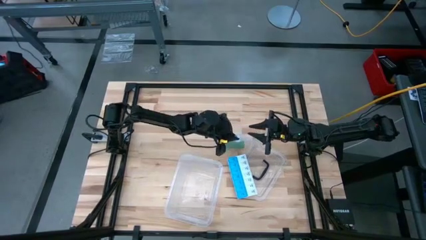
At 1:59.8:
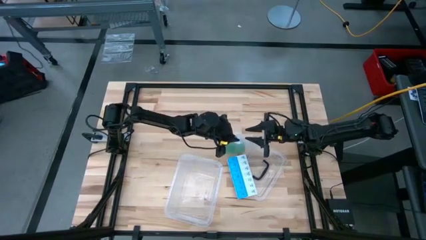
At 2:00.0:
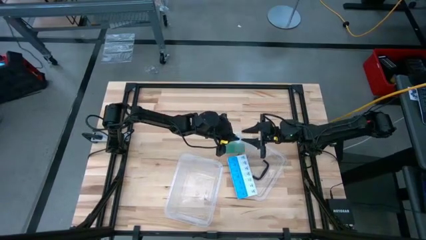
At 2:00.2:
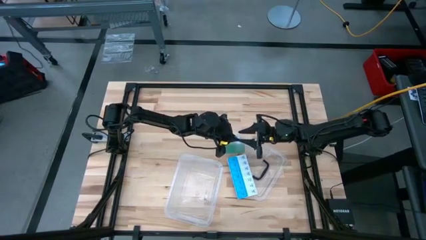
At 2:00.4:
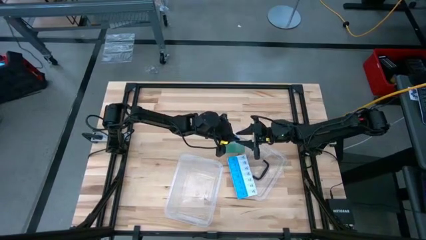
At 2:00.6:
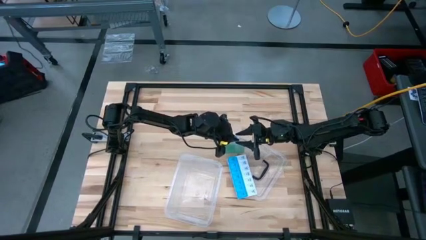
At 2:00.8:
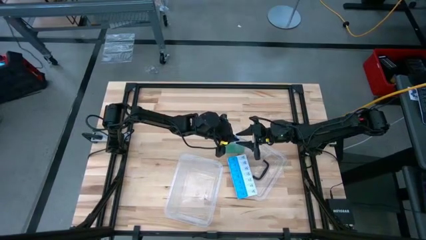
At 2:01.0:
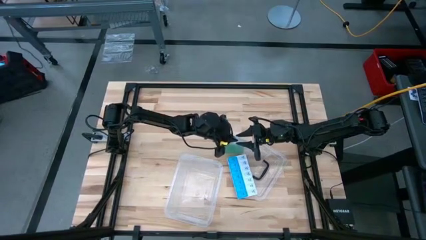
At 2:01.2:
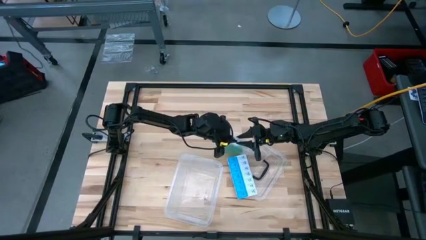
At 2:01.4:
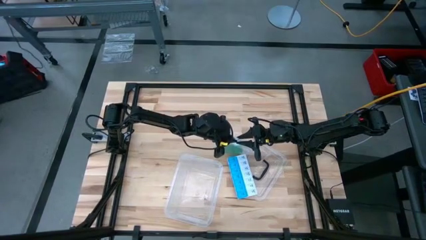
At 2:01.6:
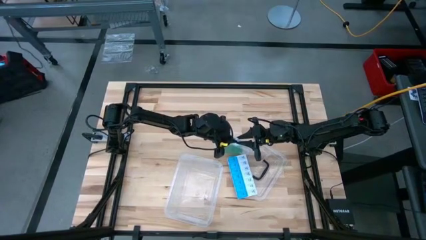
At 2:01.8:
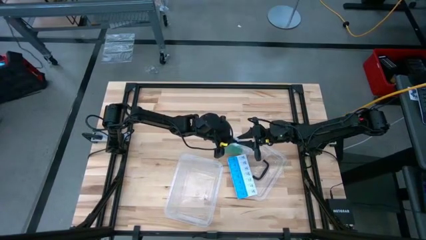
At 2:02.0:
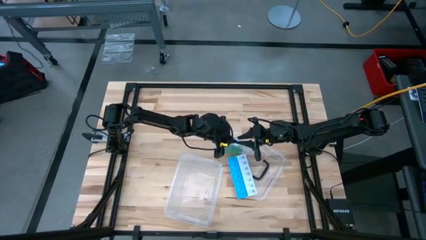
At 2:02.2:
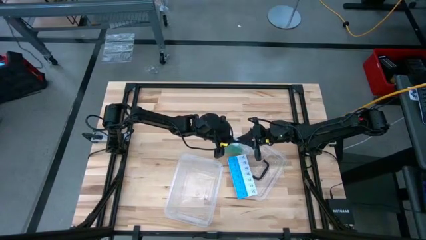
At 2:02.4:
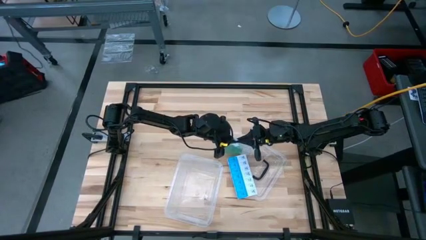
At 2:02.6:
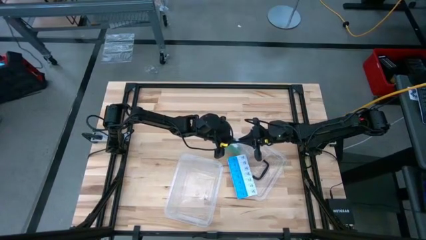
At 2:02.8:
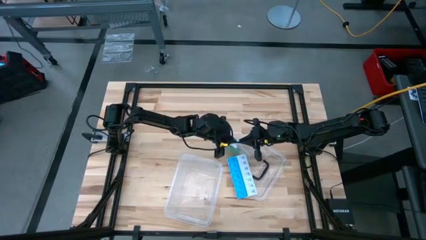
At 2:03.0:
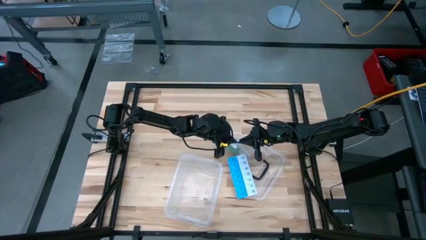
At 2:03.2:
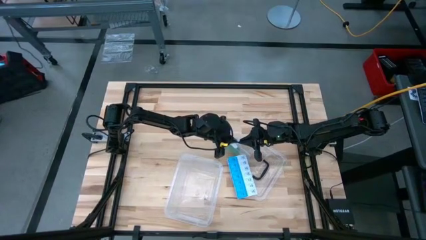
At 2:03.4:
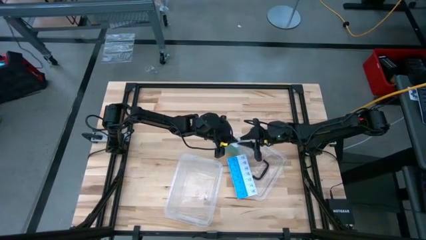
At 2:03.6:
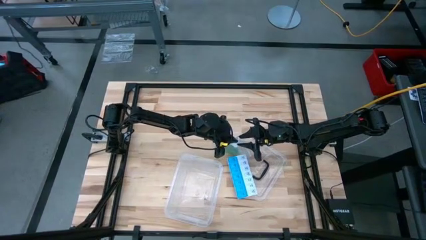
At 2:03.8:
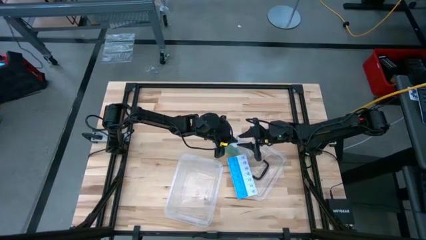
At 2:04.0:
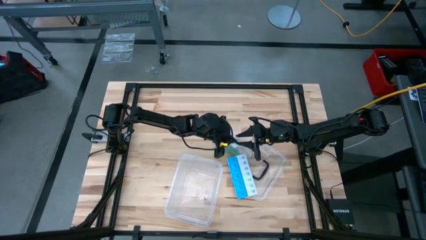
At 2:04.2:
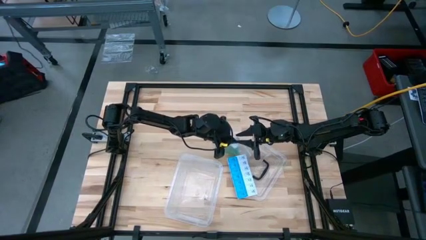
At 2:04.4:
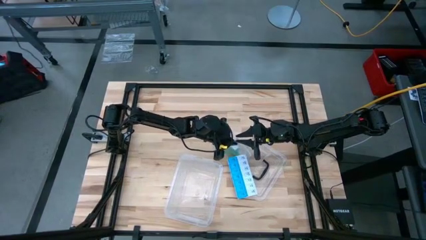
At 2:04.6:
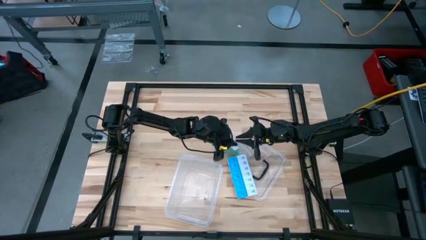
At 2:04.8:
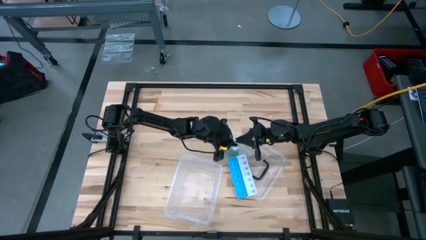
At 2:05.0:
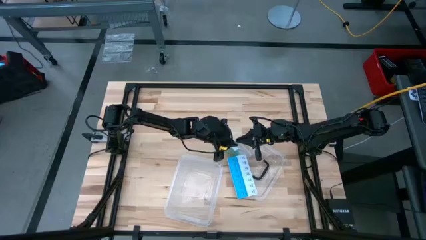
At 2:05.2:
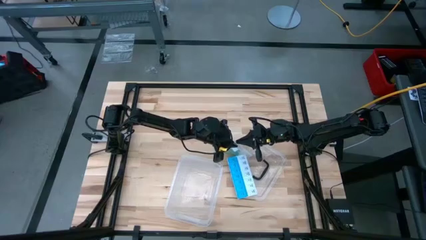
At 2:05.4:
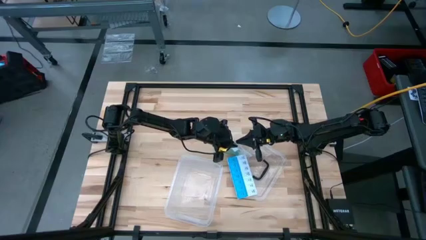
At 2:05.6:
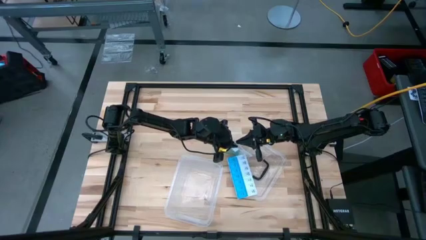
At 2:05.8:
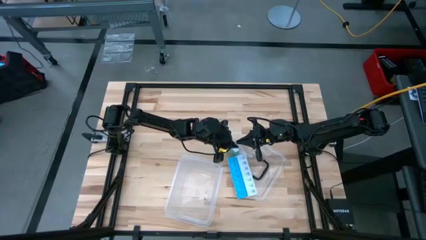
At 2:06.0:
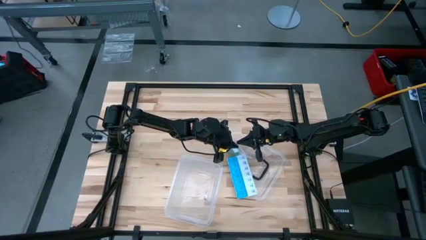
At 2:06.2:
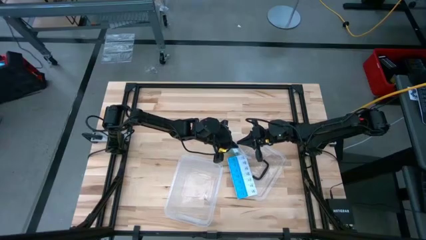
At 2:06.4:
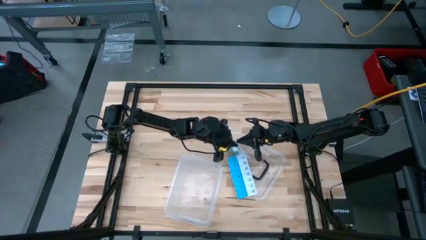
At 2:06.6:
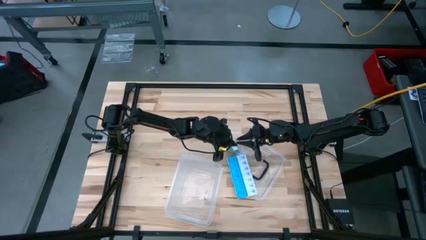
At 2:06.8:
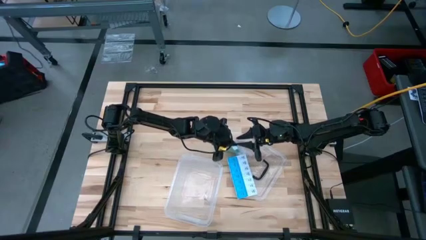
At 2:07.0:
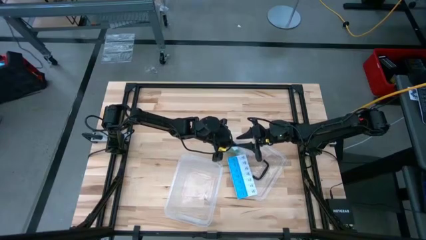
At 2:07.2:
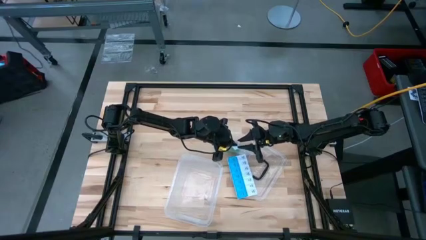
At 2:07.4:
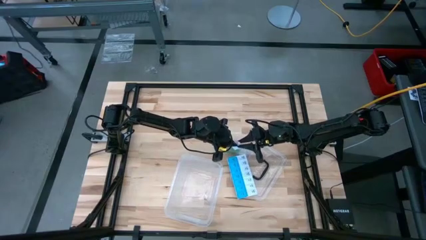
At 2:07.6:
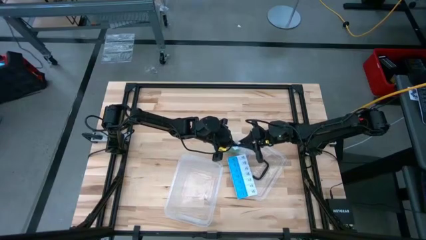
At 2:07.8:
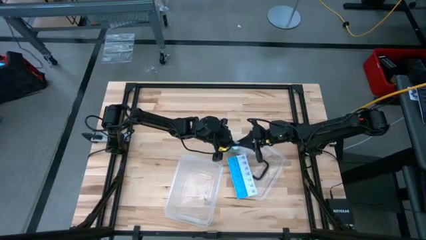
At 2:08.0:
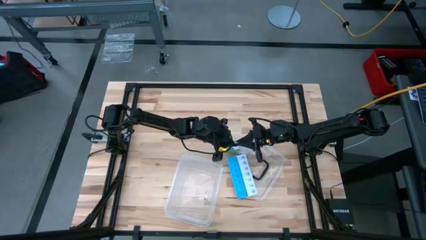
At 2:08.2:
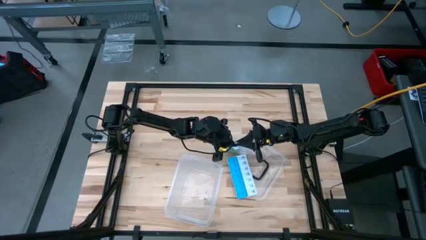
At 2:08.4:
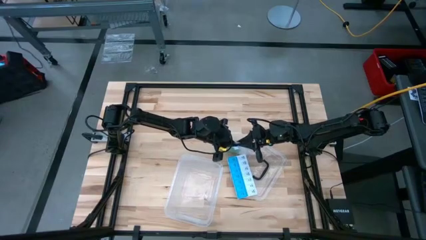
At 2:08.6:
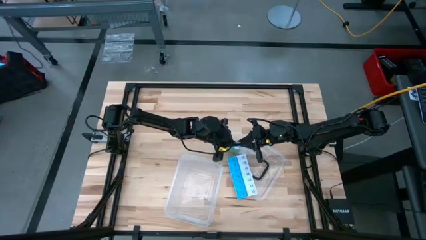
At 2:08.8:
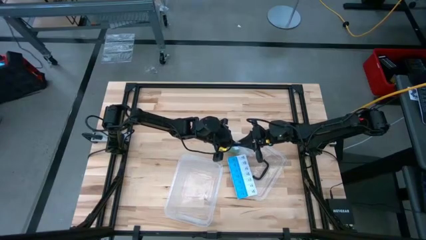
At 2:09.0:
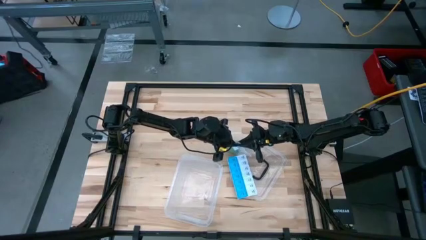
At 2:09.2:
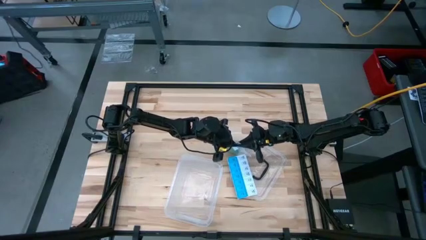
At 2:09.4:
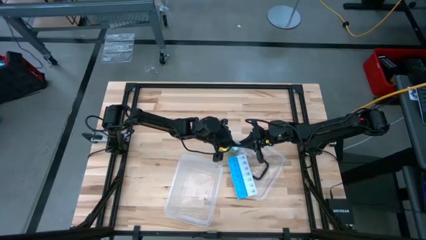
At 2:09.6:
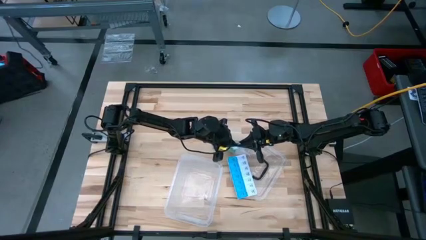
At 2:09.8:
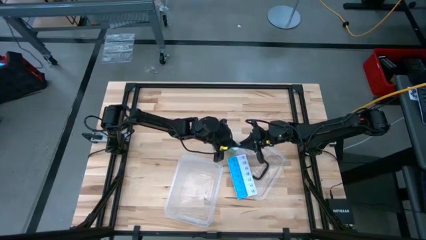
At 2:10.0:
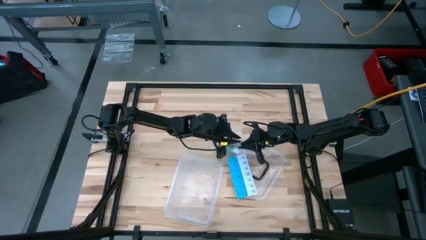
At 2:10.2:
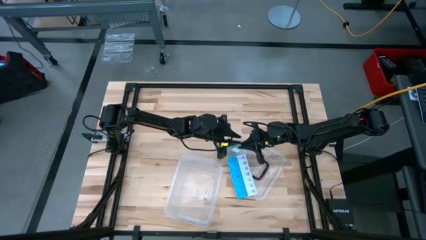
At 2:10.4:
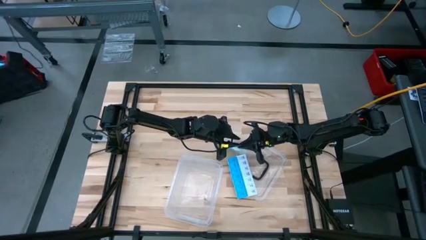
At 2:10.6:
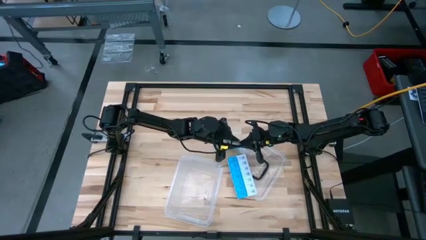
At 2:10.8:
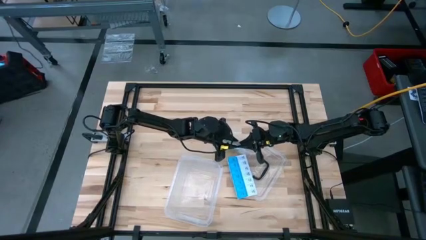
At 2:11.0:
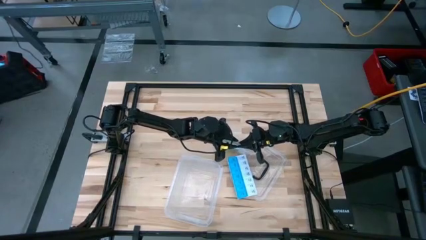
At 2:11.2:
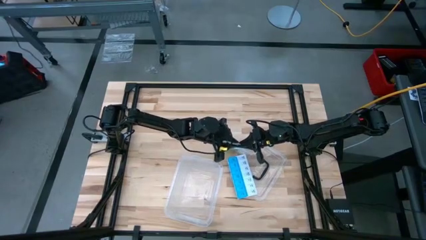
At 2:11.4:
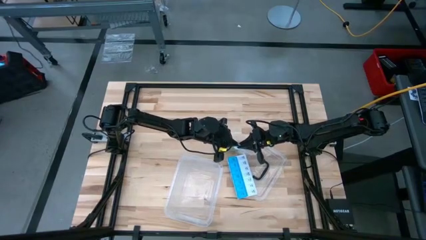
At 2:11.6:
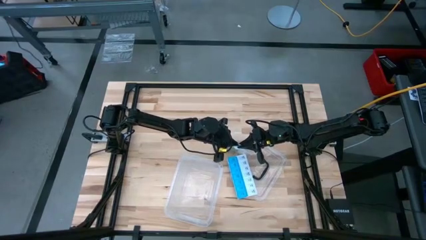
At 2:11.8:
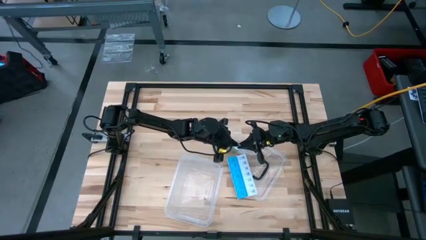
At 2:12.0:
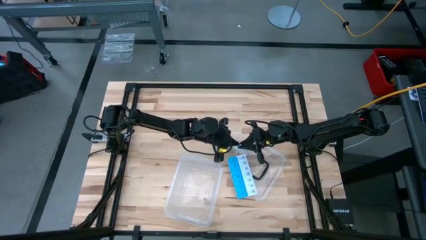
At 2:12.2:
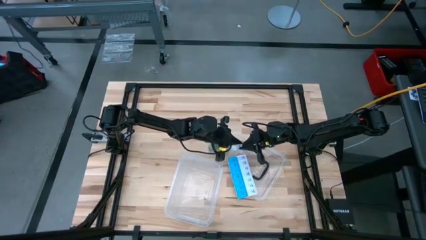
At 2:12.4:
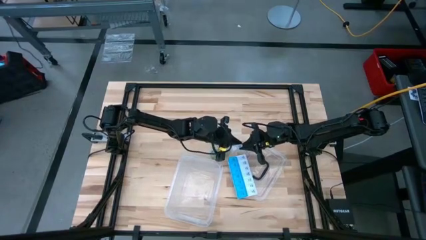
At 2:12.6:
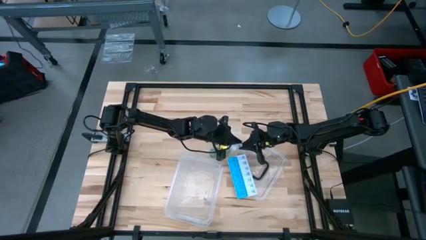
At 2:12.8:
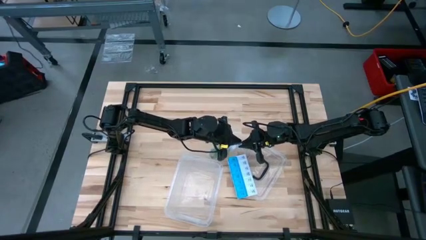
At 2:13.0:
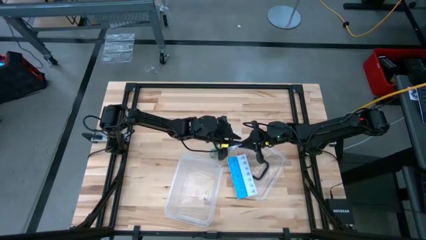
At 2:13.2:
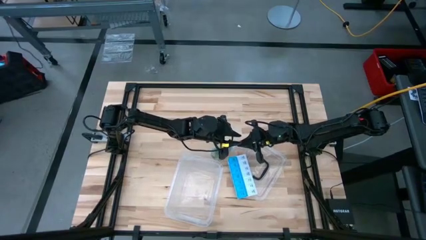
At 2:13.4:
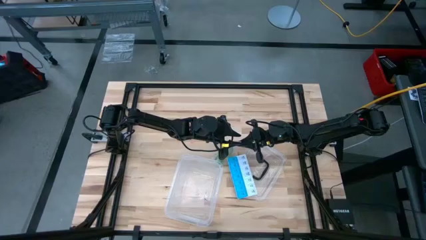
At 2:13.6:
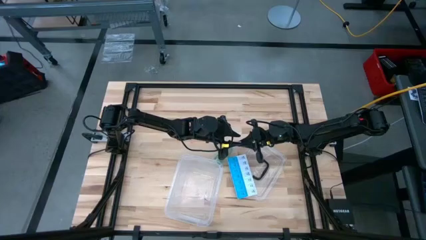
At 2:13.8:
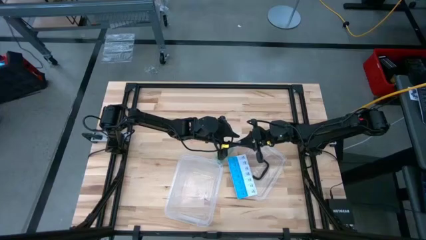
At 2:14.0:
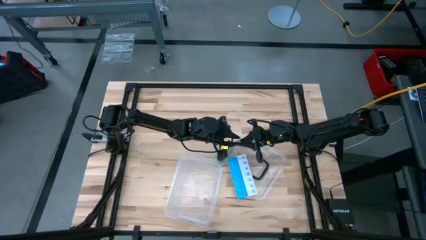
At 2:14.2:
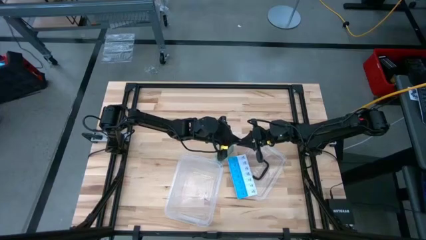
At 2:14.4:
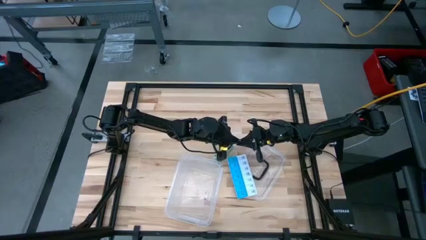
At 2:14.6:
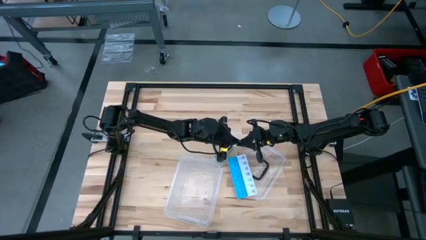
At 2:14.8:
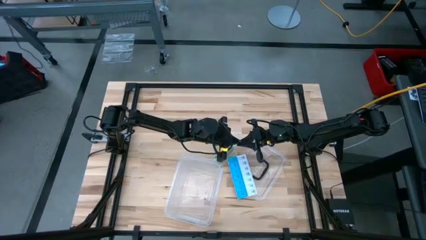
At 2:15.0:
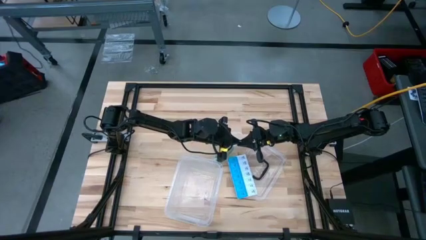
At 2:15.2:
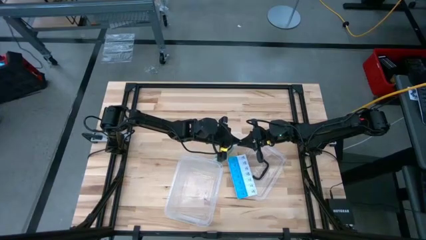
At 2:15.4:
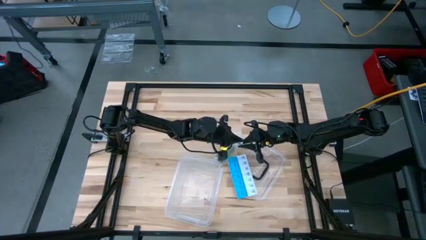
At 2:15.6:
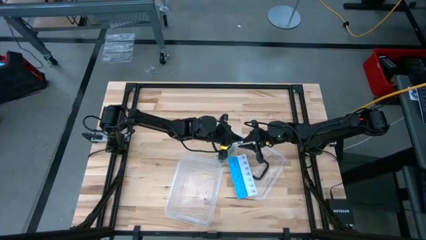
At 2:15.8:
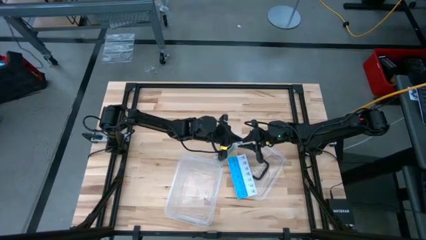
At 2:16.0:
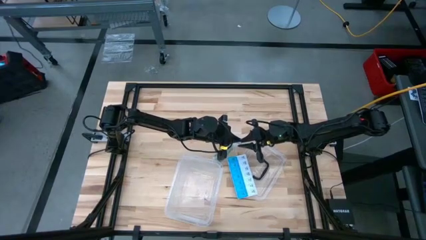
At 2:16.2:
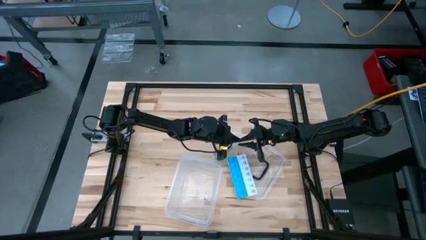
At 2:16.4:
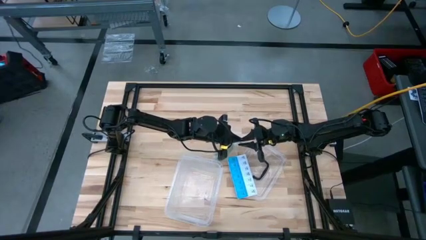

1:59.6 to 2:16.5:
Task: Roll bandage
Close the transparent zip bag
